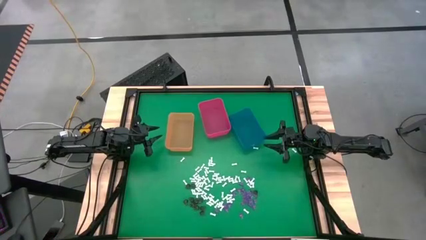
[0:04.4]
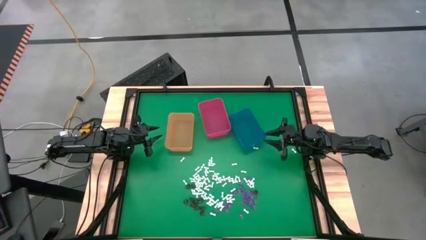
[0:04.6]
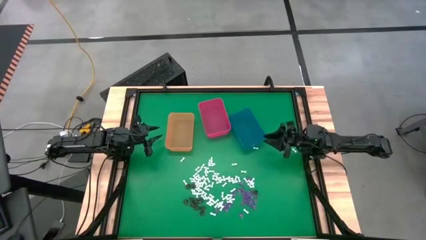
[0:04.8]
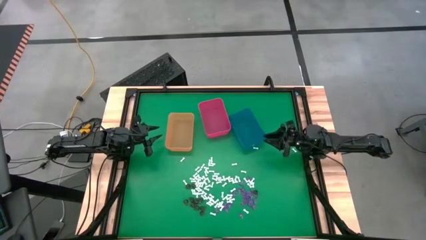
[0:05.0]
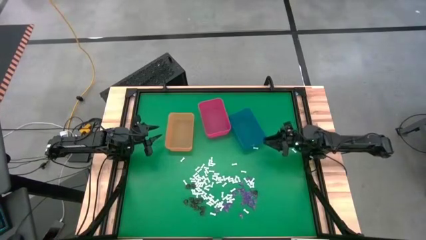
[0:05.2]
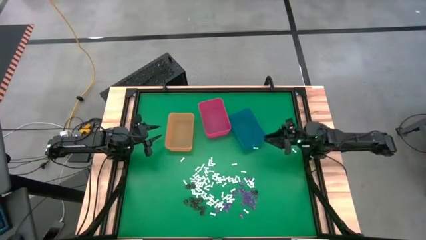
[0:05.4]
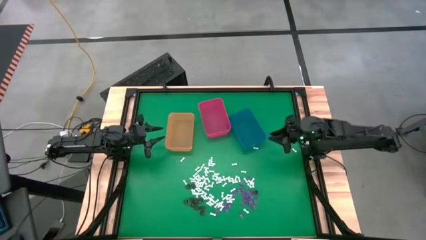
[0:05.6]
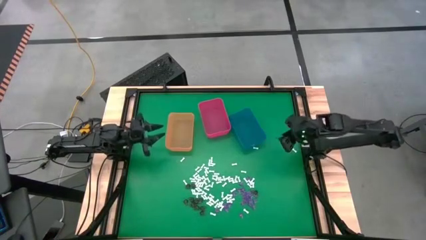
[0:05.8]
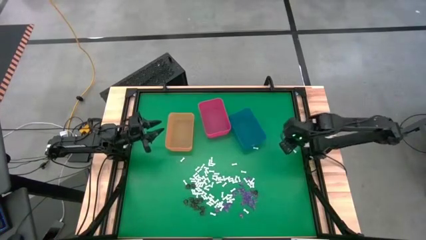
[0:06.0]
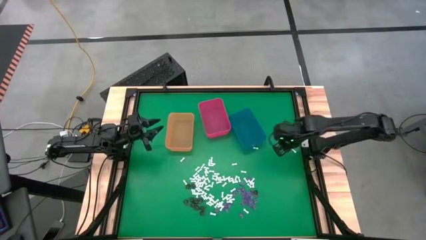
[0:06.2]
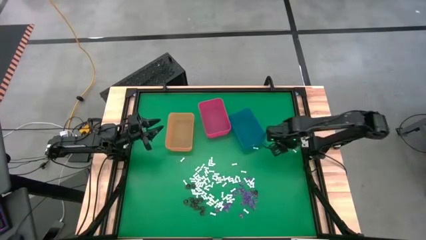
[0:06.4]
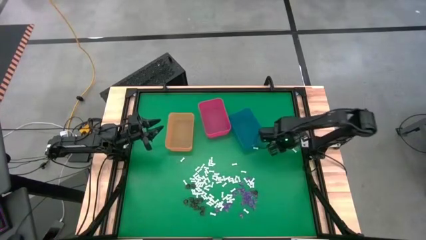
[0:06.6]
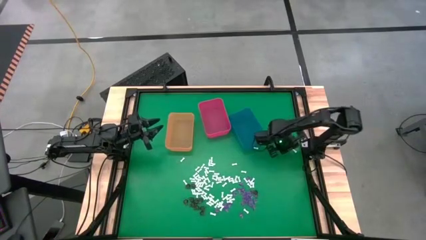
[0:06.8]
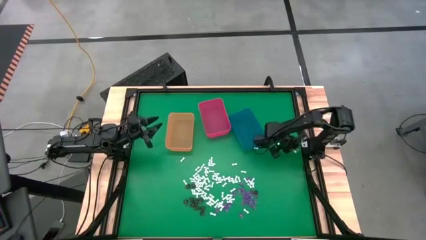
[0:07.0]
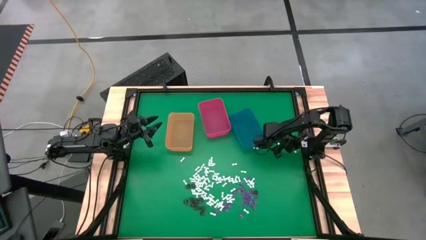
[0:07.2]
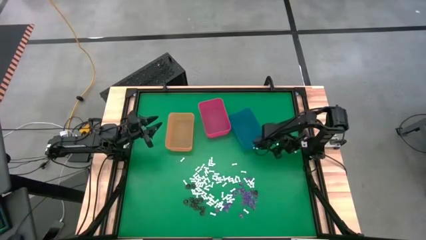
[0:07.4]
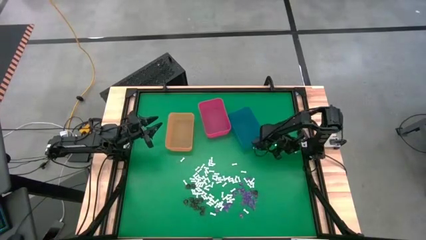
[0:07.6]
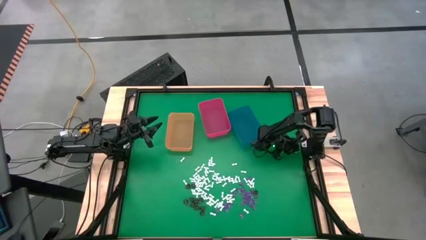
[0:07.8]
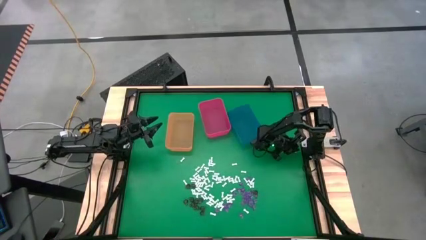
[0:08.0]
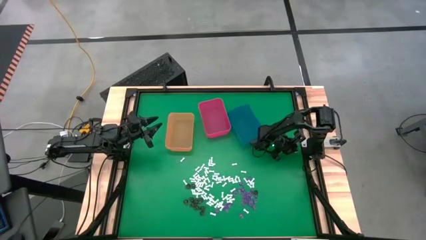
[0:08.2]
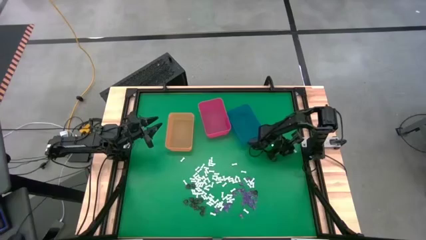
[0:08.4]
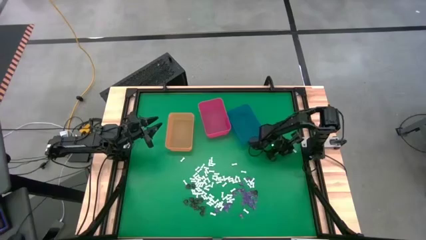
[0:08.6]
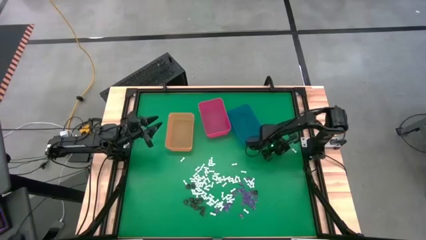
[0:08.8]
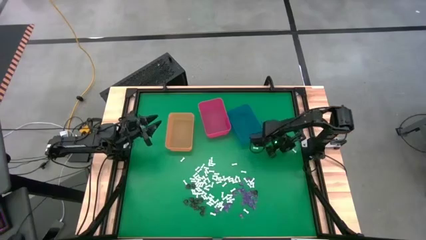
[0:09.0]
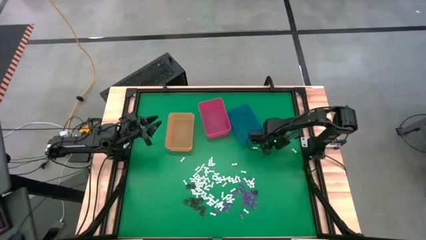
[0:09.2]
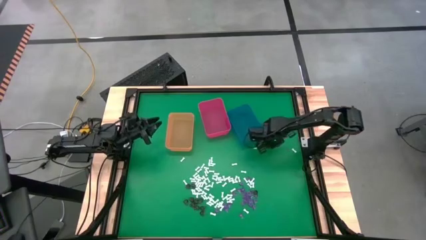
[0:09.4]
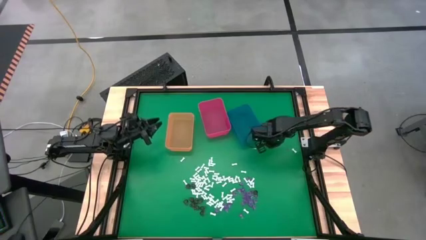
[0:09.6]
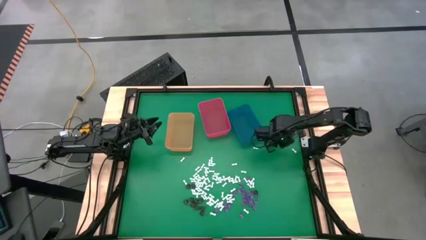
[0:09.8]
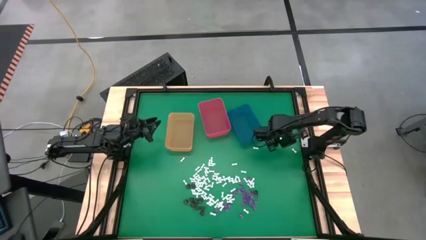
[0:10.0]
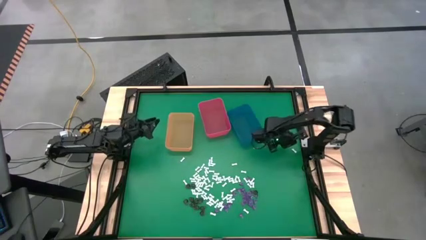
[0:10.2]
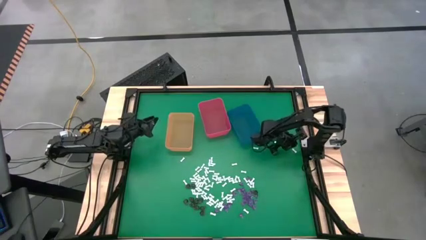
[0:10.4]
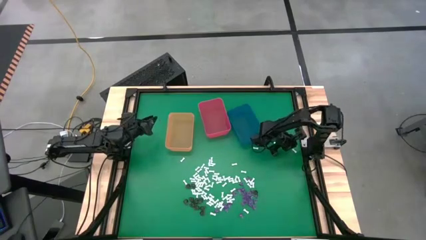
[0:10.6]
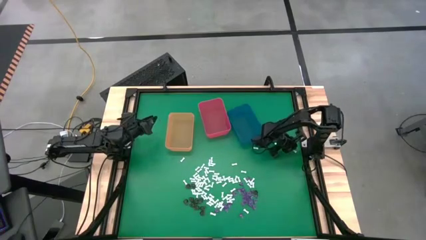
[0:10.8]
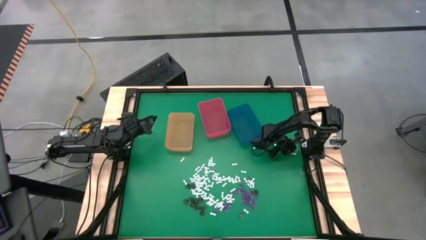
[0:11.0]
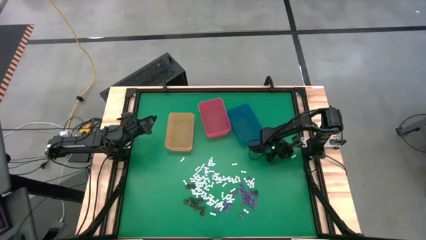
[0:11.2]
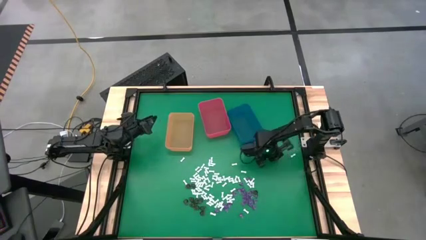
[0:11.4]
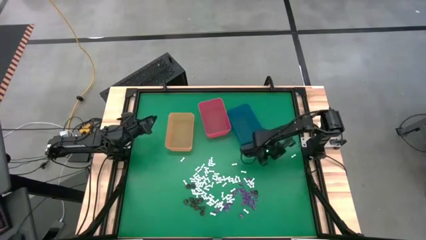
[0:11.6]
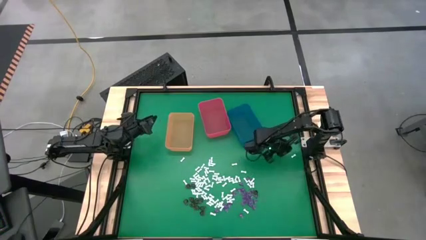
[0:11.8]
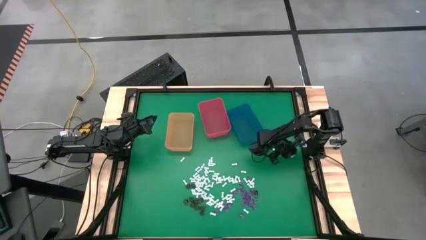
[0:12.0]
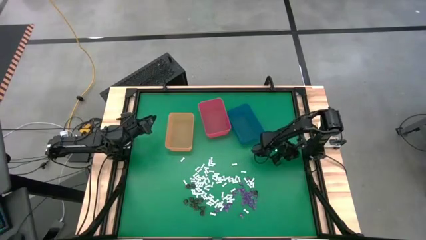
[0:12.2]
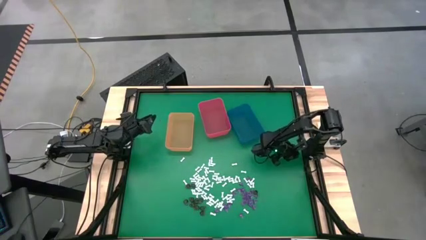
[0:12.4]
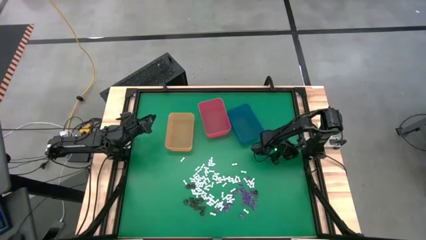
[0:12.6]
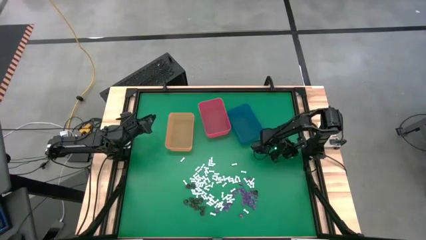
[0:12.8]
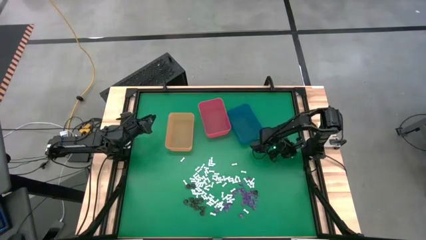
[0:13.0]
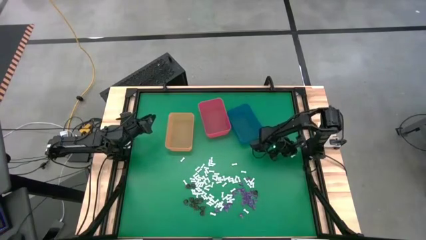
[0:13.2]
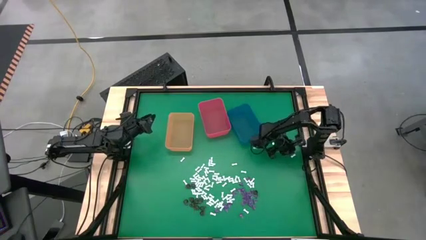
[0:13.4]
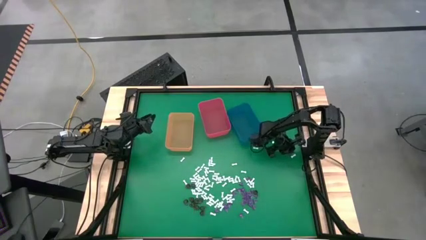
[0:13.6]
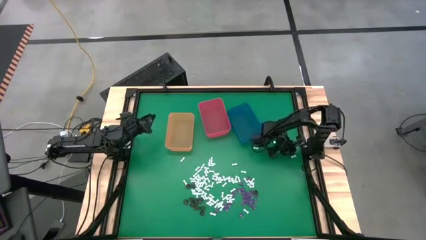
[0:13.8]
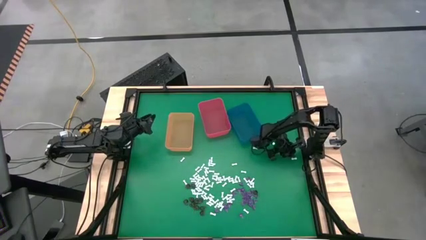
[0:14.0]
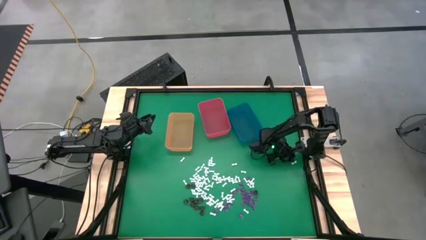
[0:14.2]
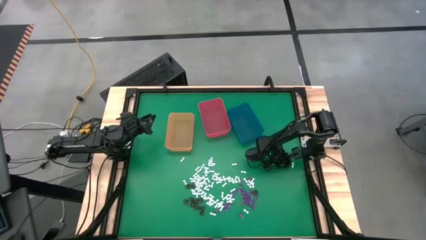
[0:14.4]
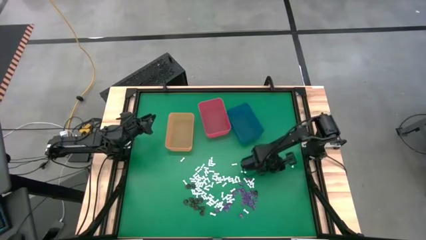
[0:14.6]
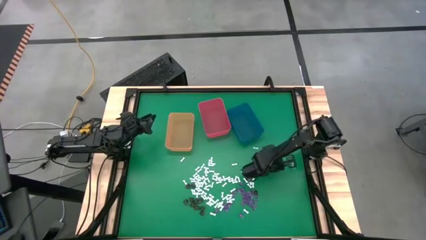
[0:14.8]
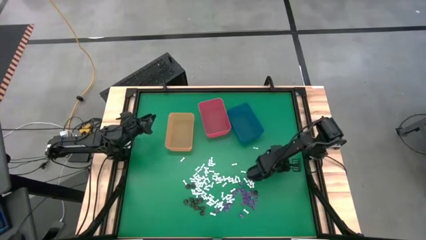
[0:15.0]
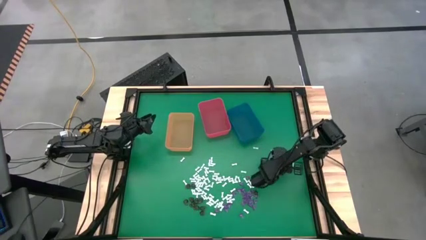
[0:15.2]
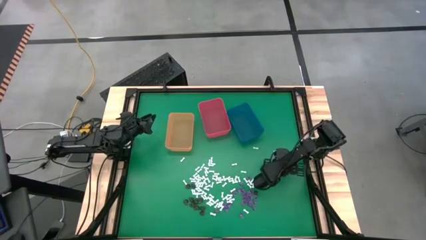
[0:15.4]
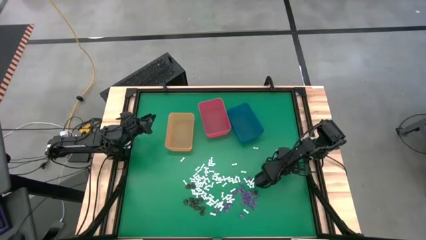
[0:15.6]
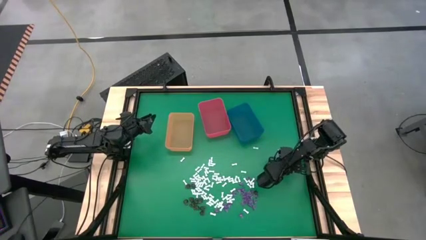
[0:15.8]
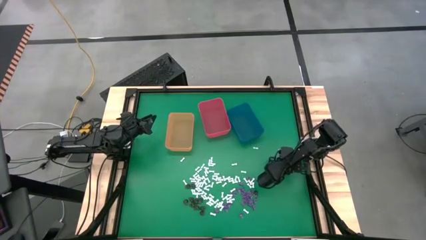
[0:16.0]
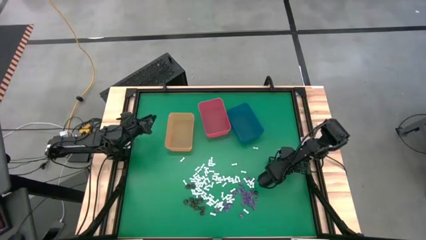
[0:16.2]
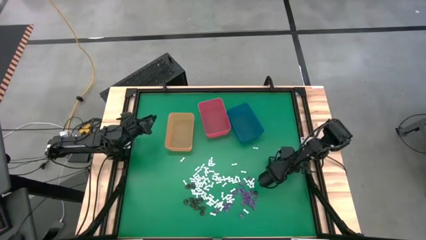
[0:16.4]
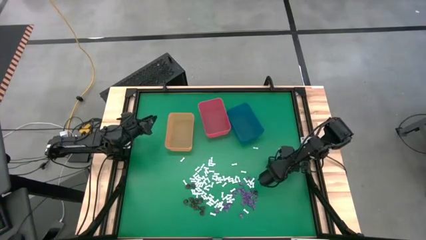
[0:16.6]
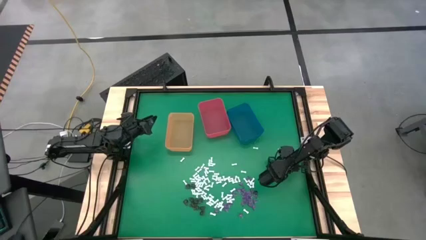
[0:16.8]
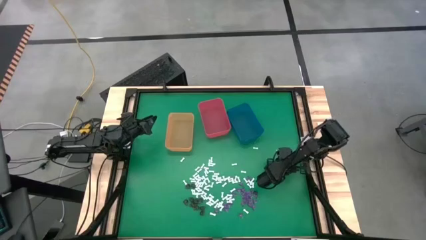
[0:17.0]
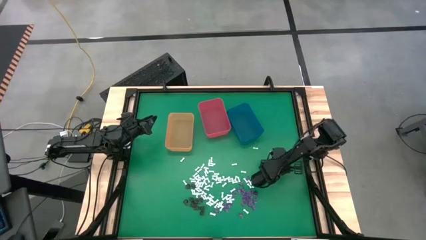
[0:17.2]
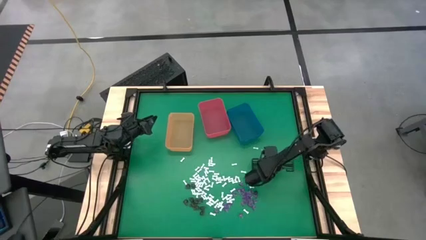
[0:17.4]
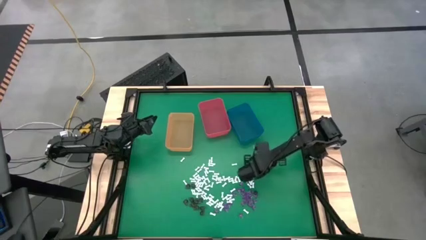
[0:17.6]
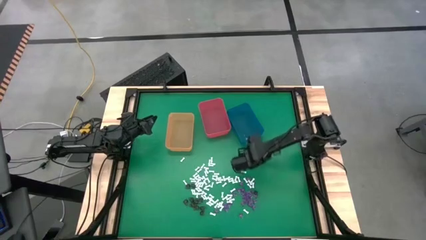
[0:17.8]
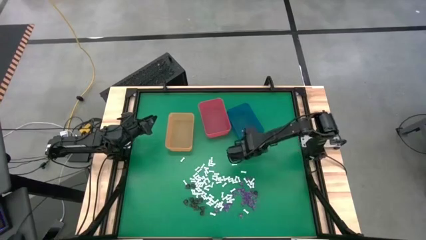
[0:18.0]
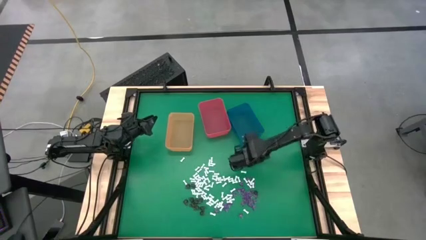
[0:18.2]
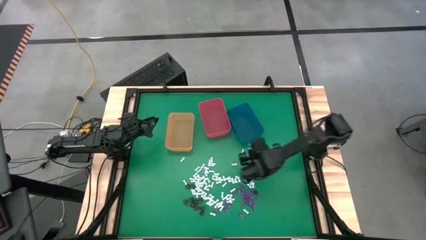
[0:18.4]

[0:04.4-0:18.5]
Task: Sort Halloween decoration
Put the white bone toy into the blue bin
